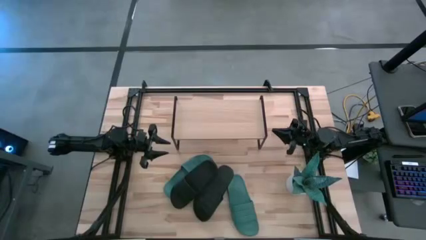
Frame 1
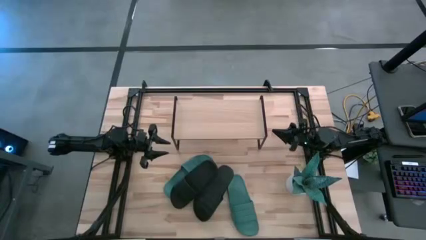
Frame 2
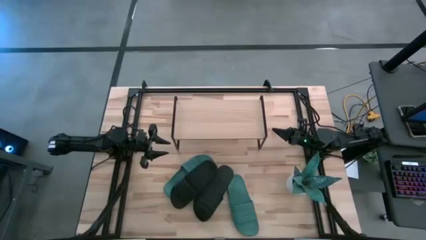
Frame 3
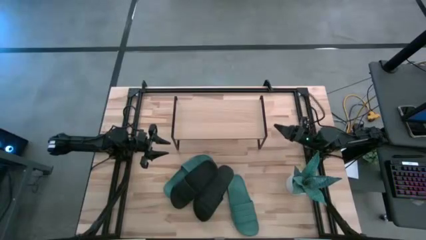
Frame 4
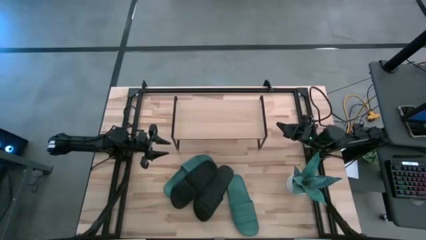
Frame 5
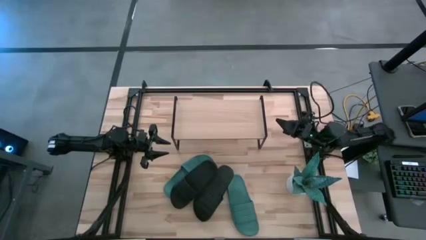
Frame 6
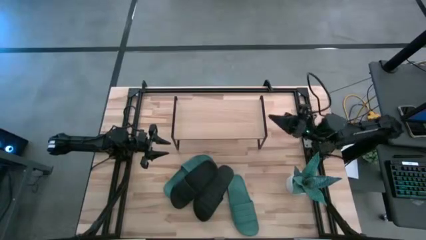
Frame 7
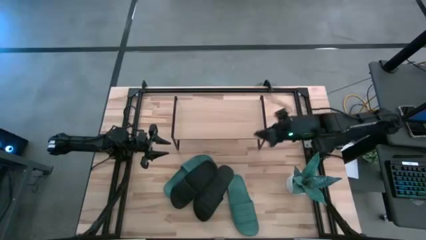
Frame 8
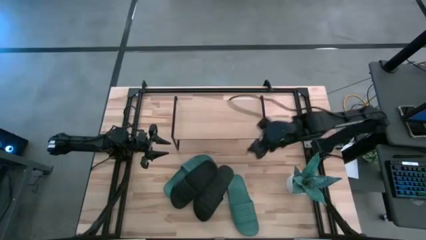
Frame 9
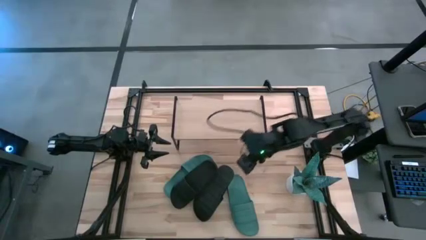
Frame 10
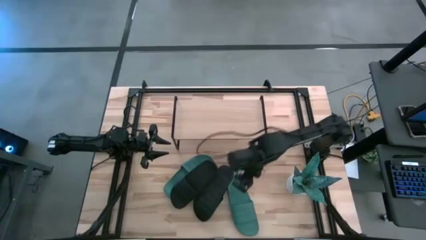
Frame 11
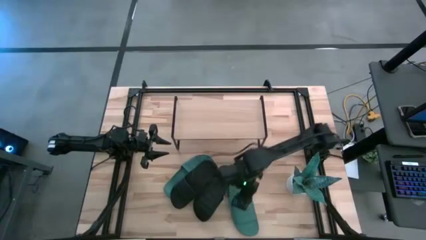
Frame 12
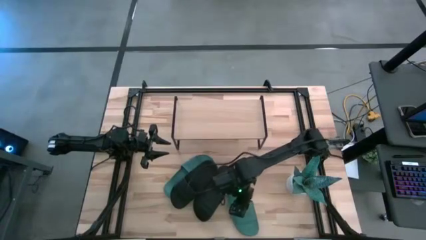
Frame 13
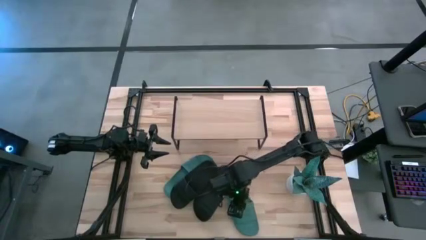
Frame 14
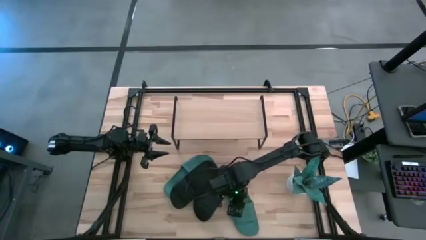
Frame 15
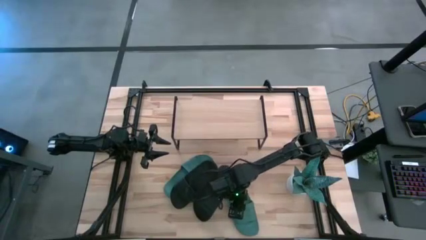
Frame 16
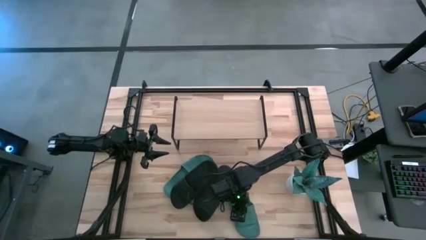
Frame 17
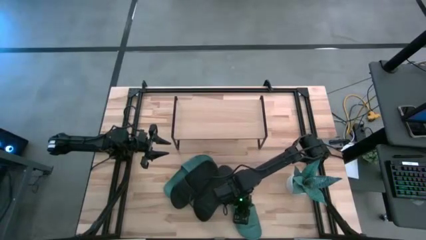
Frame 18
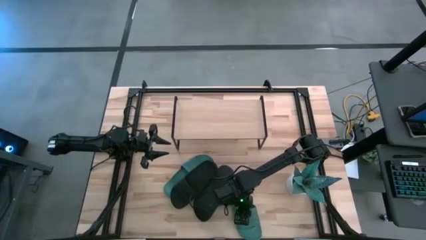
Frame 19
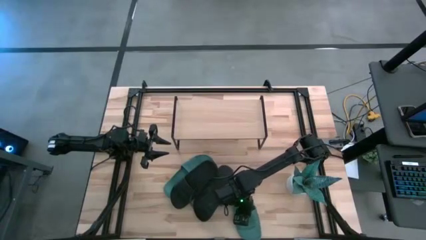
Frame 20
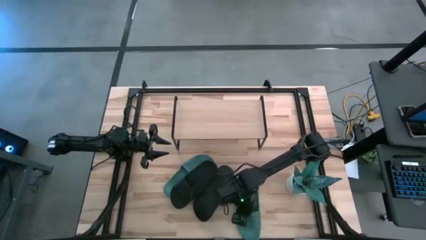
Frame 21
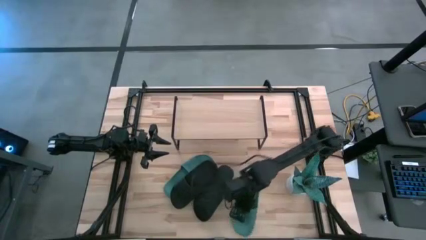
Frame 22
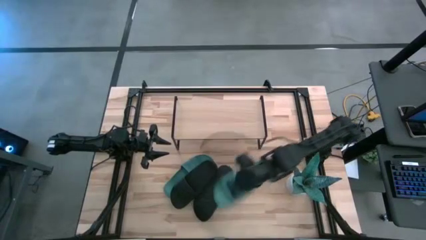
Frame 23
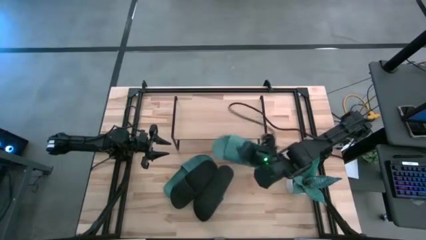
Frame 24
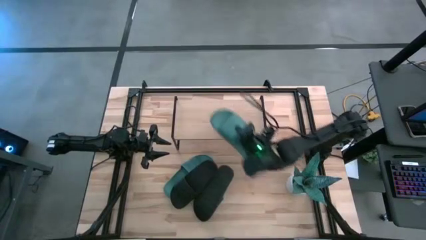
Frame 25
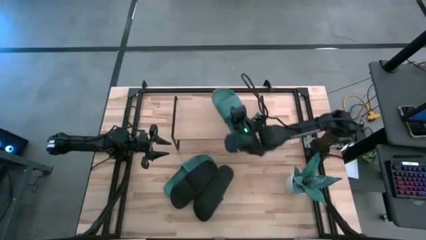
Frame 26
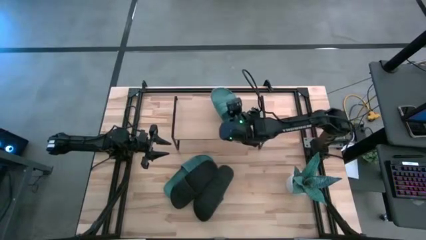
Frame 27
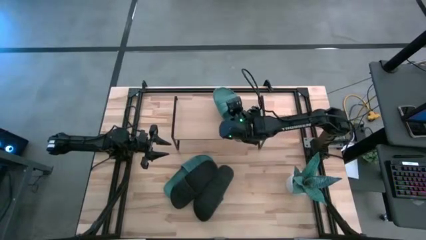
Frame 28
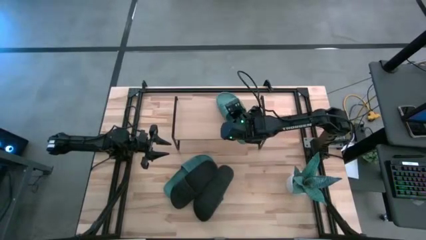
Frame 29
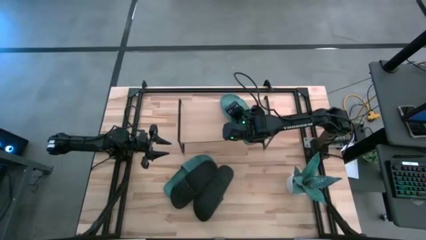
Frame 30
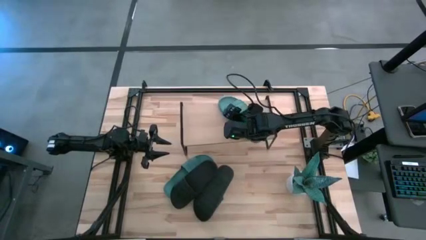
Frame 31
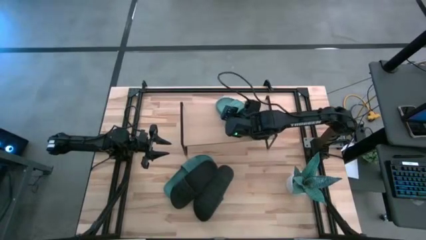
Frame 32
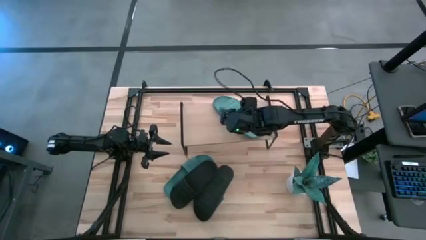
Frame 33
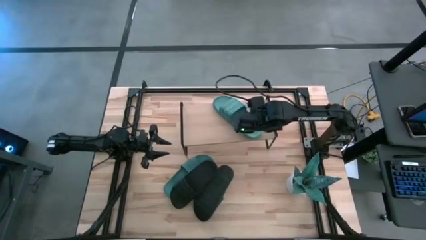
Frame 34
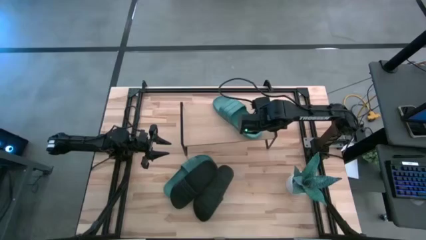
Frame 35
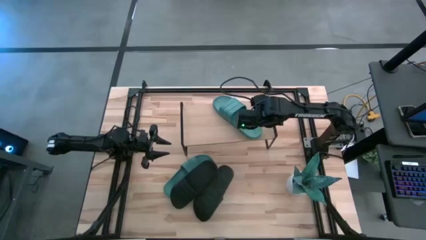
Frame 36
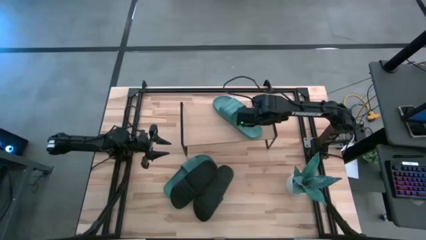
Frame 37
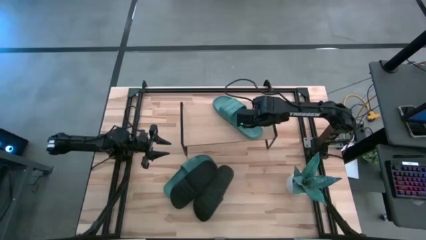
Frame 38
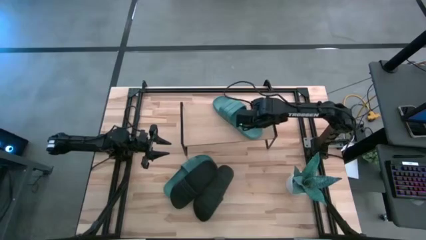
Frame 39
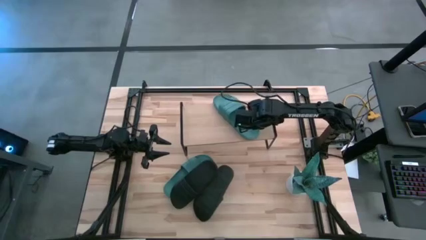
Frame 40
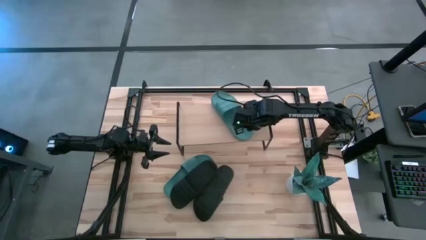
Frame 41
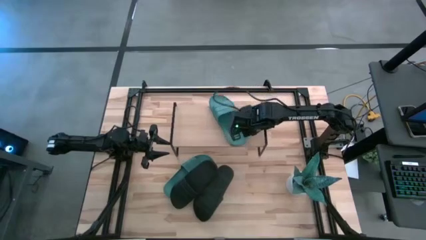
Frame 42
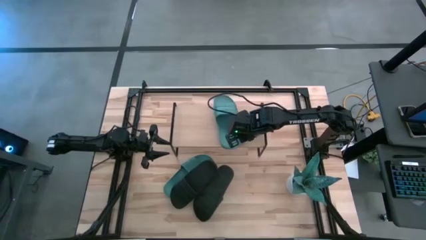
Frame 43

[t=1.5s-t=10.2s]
Task: Pick and place slides into the shelf
Put the right blue slipper on the shelf

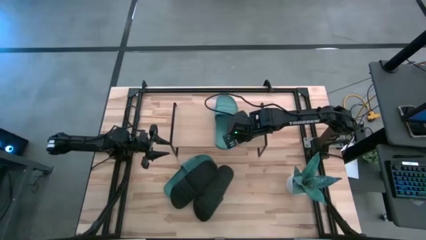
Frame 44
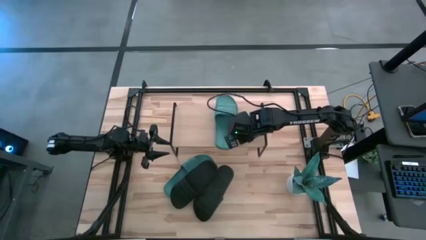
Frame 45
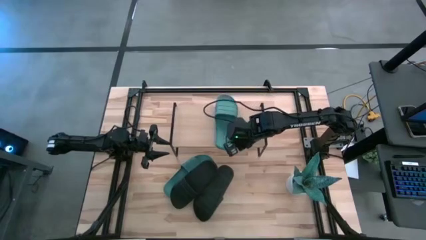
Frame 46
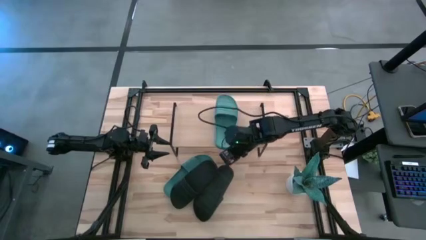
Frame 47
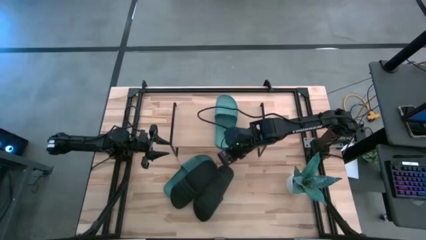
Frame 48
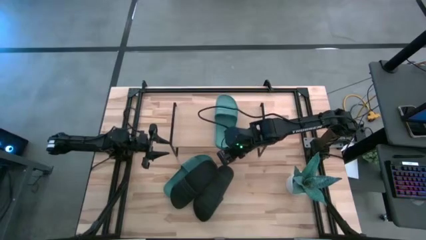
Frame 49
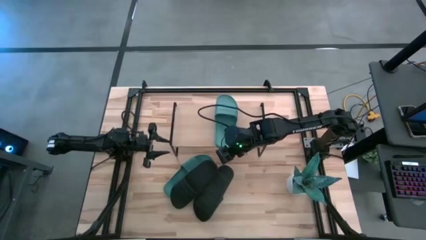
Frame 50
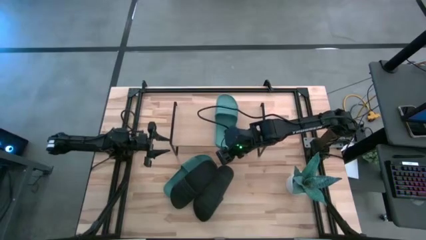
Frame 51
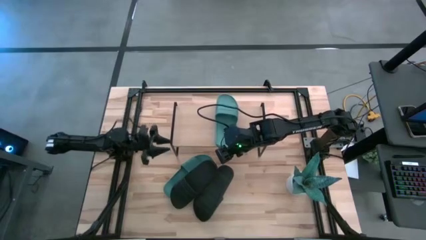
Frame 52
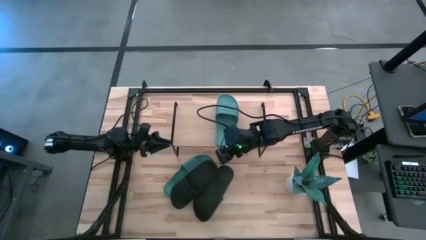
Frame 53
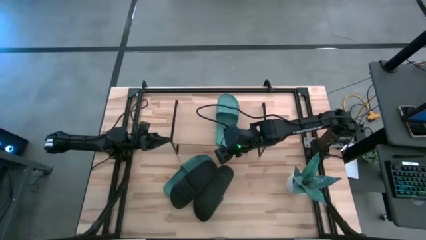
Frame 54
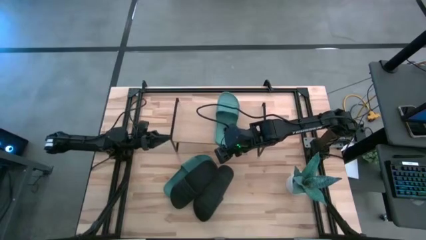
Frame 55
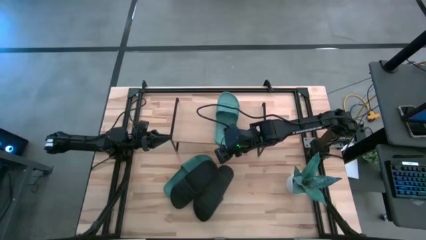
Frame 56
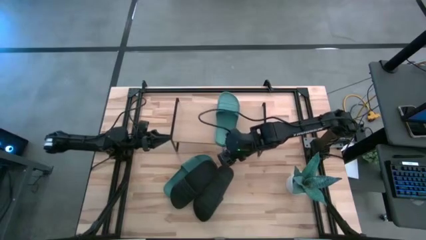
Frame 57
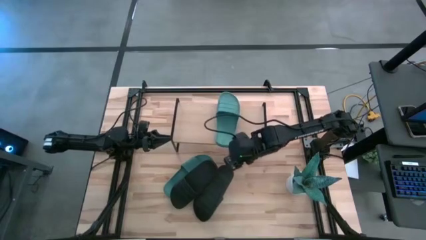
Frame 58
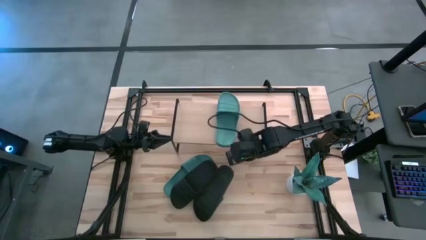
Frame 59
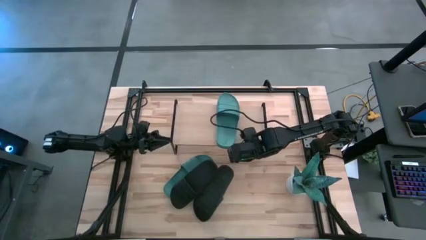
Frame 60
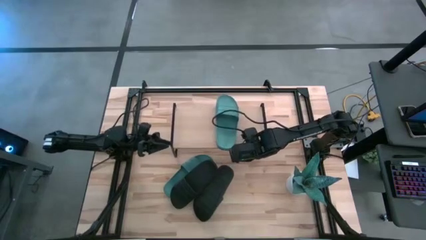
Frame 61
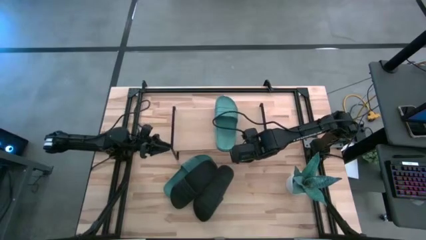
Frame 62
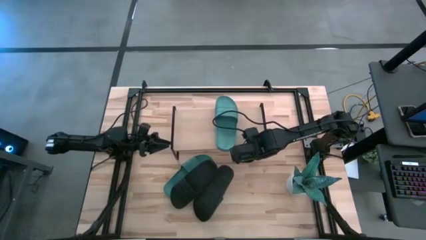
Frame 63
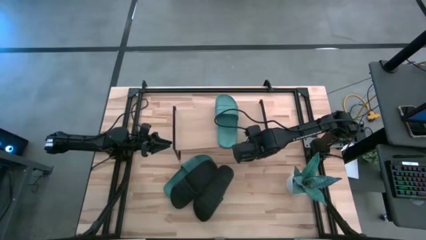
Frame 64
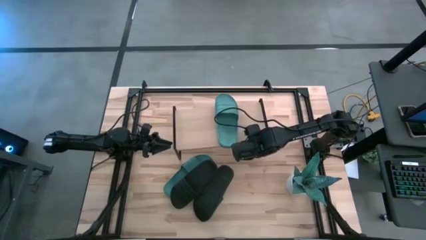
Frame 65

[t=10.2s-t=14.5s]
Adjust the shelf

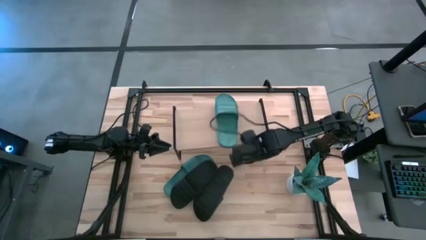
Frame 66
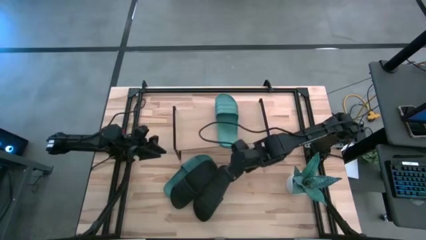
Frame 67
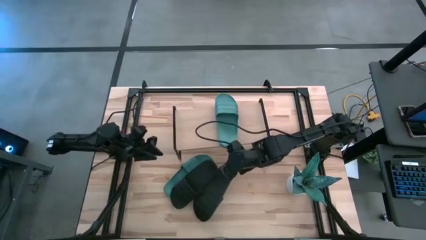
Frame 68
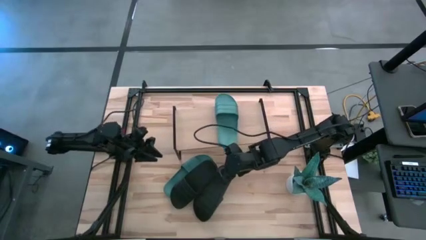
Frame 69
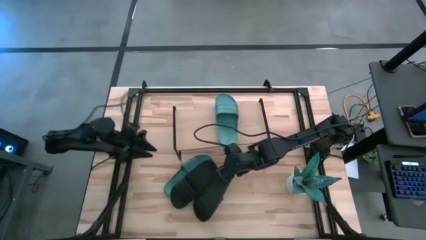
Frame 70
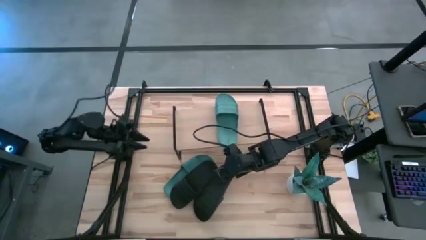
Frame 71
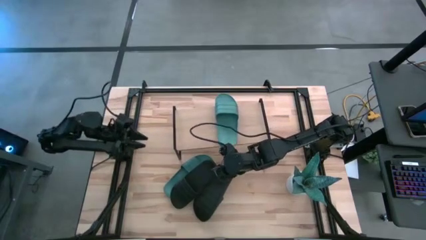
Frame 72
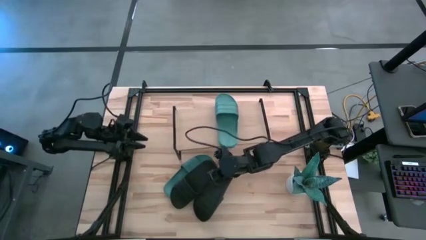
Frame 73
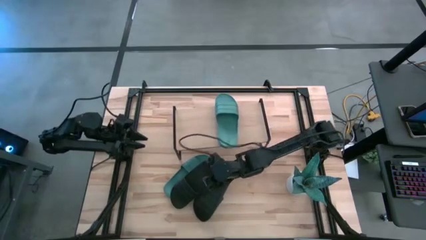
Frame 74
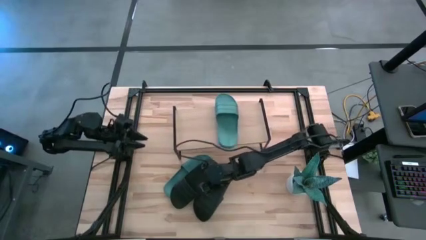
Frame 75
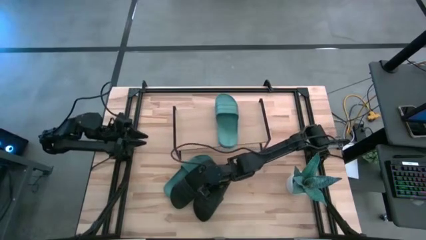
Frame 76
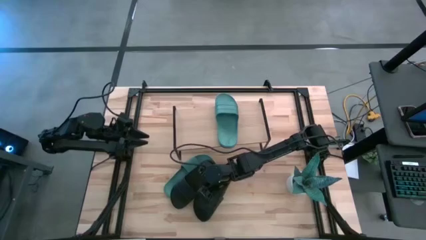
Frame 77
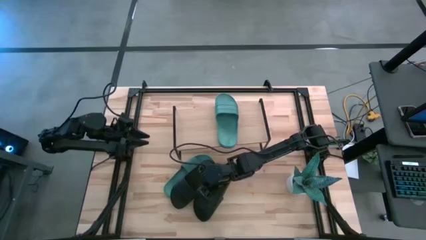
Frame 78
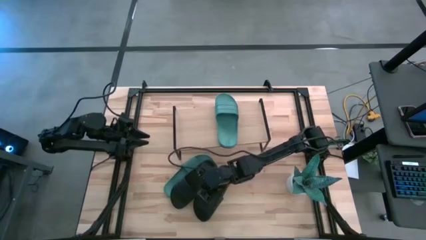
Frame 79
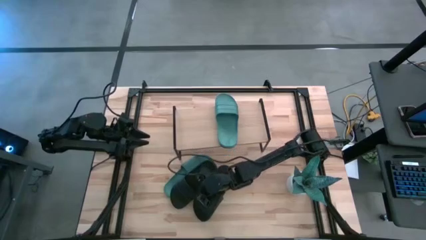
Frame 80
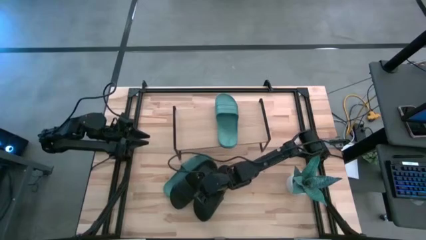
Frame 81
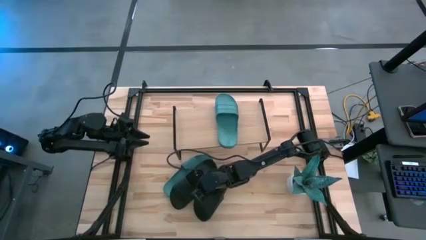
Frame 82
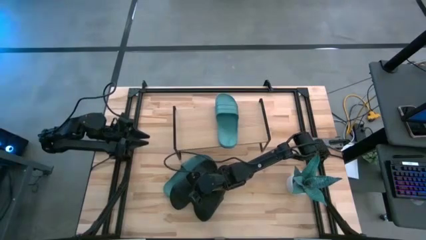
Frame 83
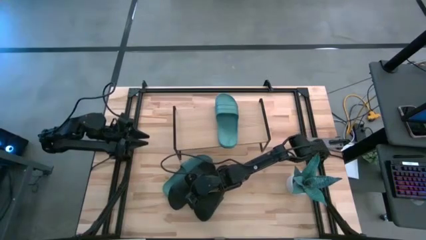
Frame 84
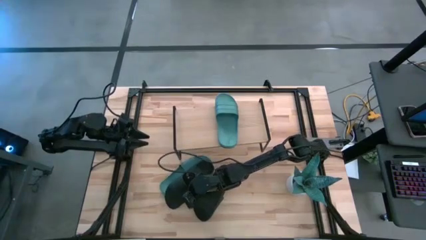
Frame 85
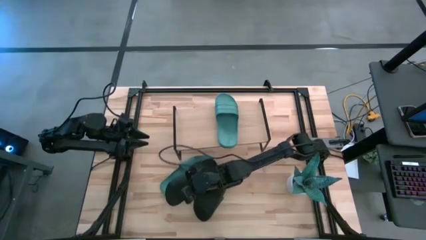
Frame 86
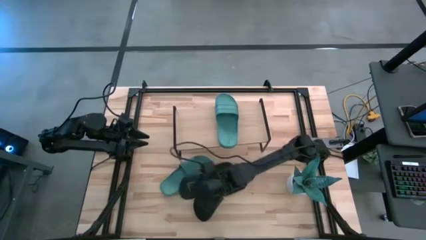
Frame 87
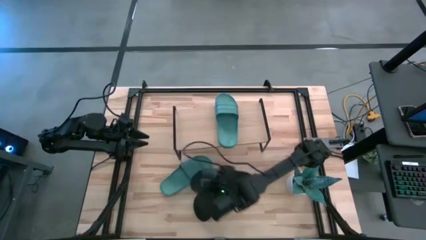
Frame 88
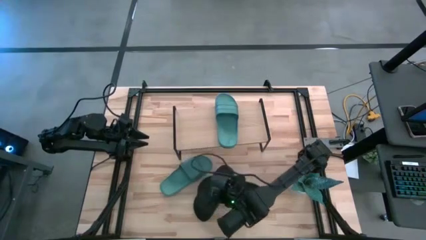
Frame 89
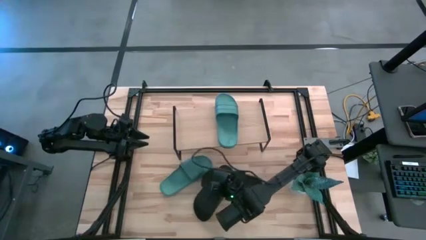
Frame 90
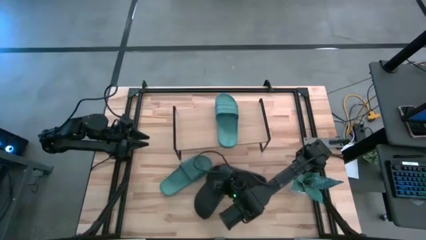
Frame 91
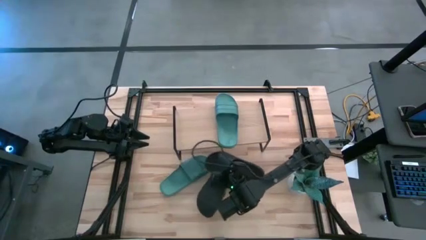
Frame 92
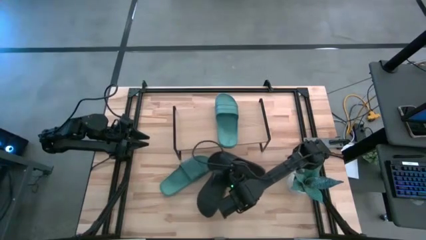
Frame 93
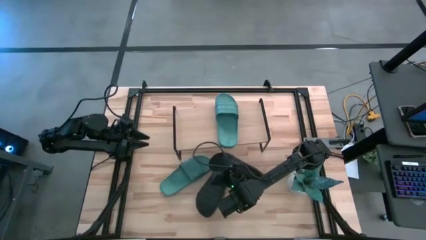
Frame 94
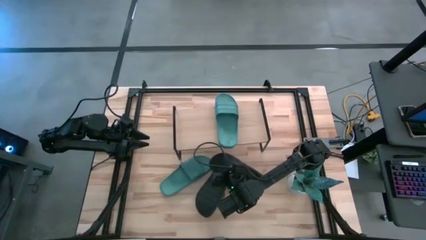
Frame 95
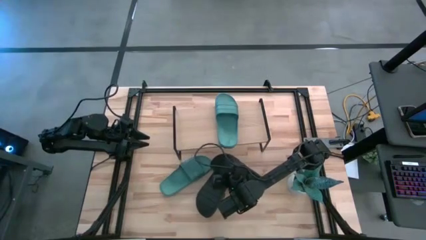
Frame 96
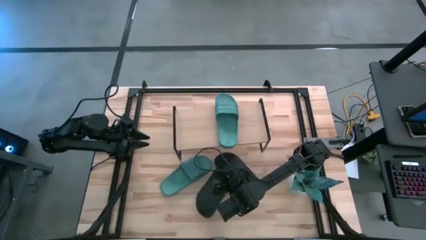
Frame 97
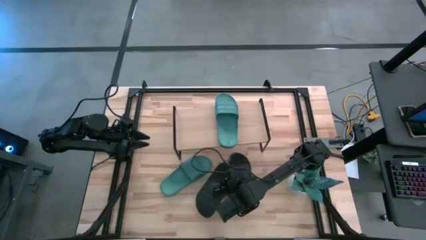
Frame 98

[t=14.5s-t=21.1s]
Move the right black slipper to the center of the table
